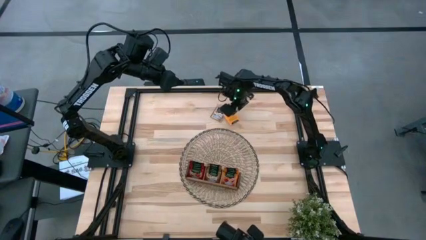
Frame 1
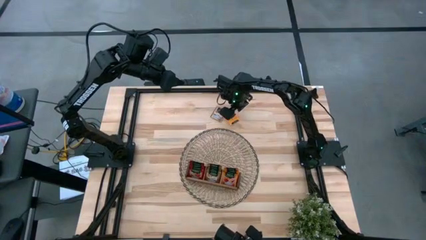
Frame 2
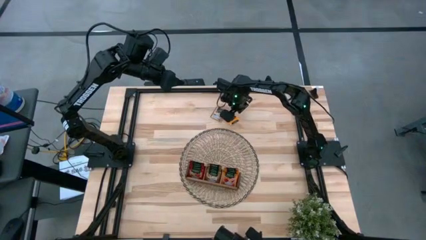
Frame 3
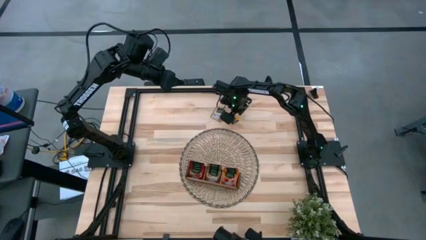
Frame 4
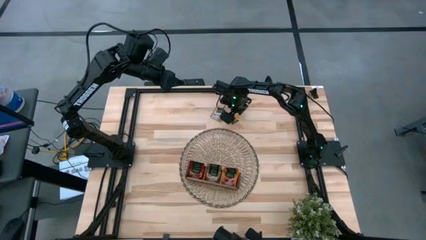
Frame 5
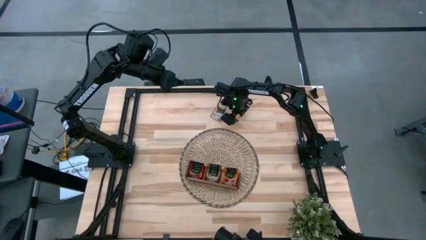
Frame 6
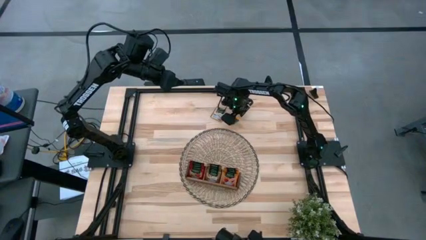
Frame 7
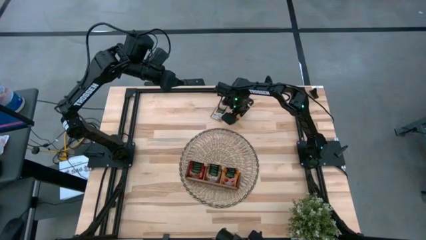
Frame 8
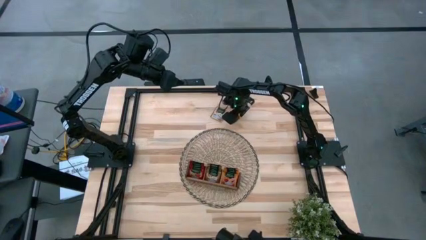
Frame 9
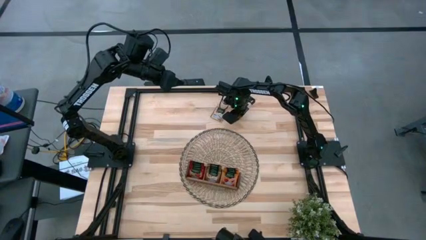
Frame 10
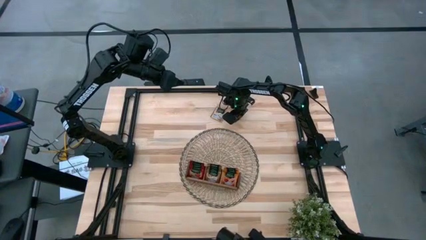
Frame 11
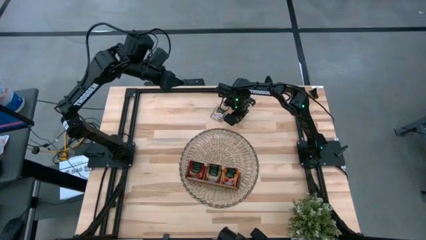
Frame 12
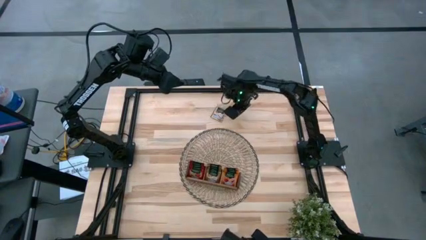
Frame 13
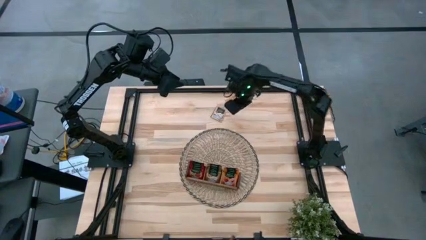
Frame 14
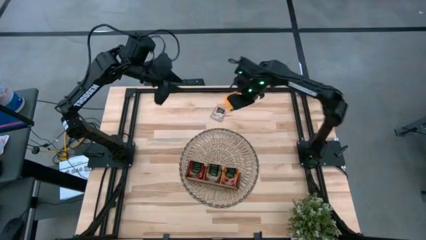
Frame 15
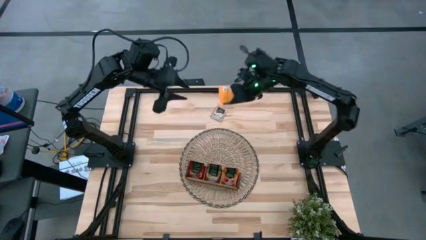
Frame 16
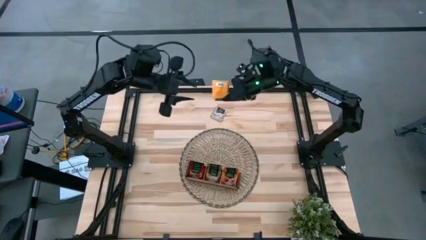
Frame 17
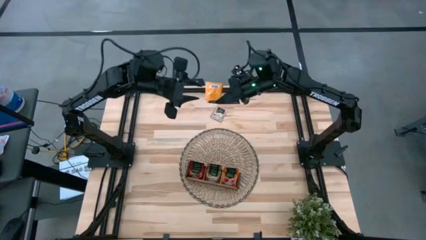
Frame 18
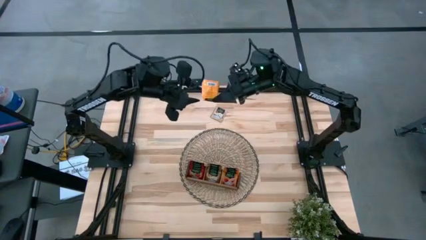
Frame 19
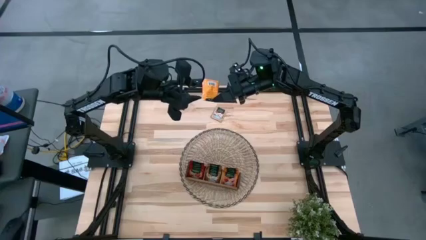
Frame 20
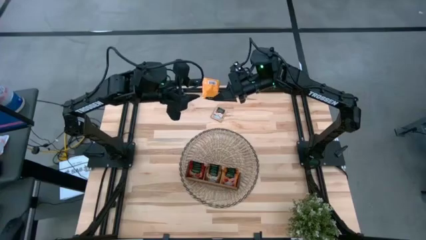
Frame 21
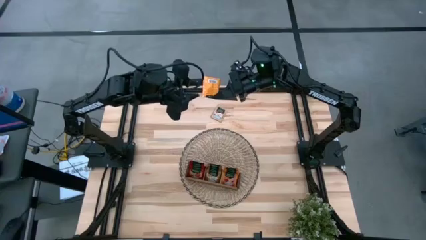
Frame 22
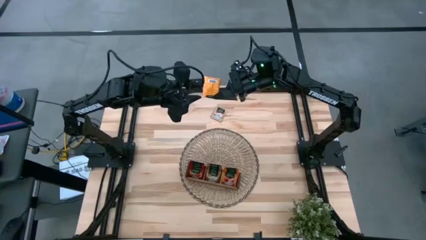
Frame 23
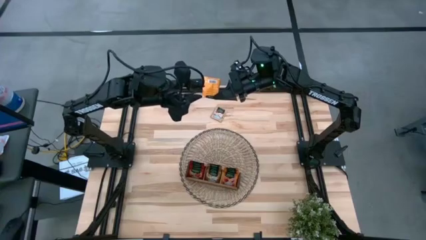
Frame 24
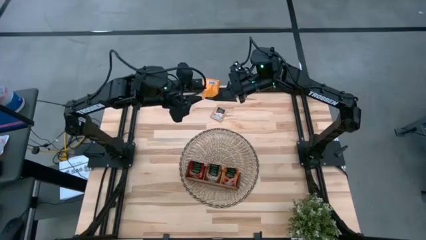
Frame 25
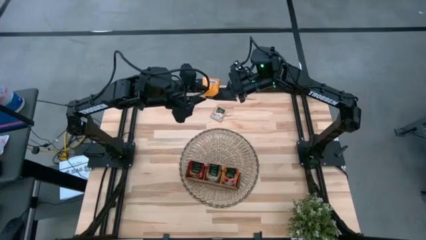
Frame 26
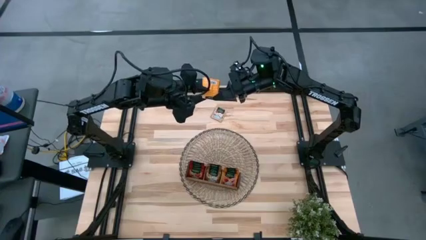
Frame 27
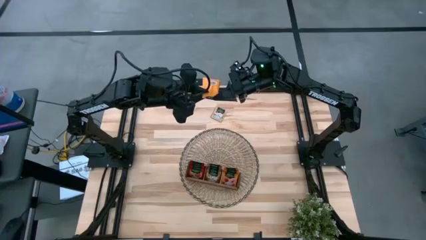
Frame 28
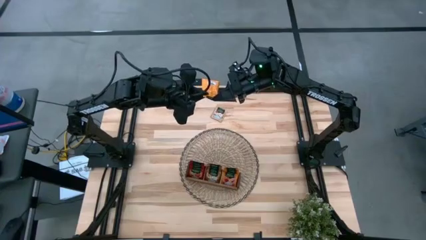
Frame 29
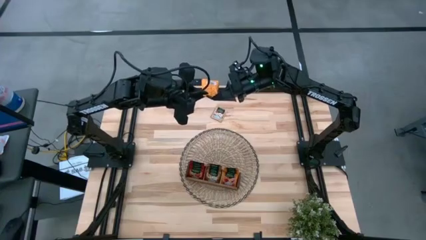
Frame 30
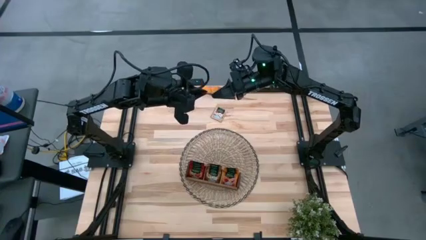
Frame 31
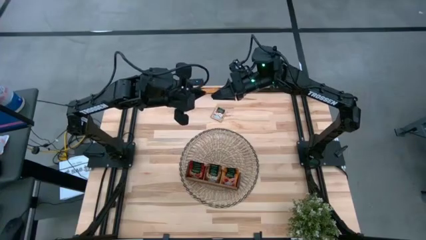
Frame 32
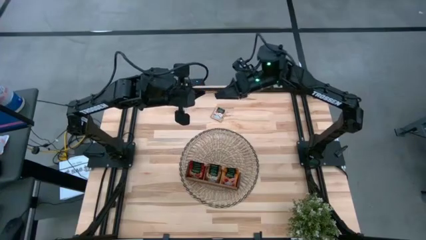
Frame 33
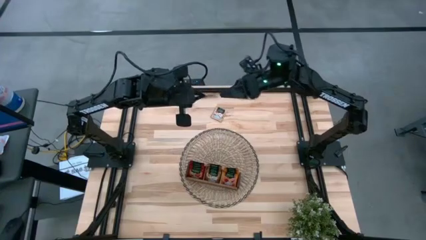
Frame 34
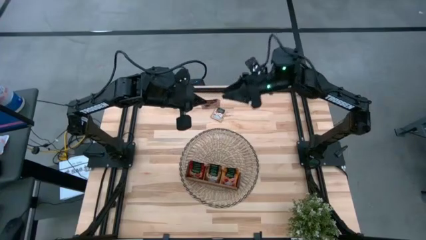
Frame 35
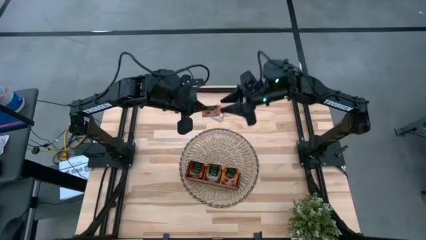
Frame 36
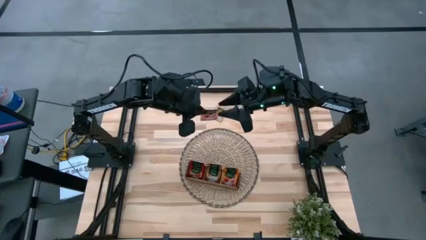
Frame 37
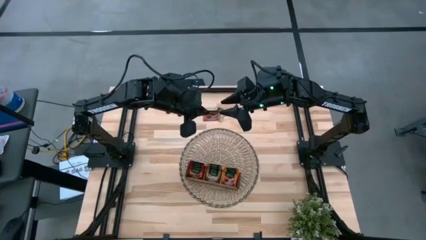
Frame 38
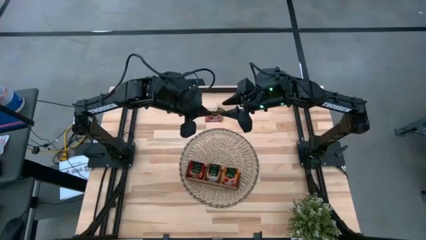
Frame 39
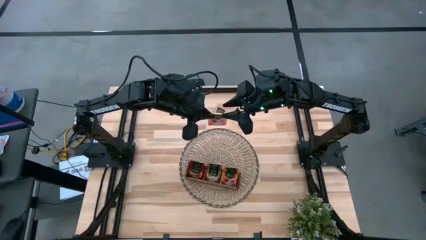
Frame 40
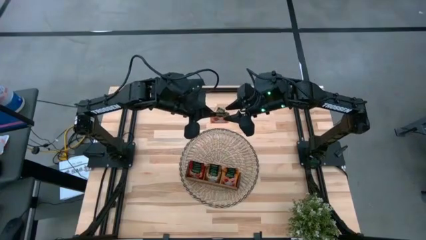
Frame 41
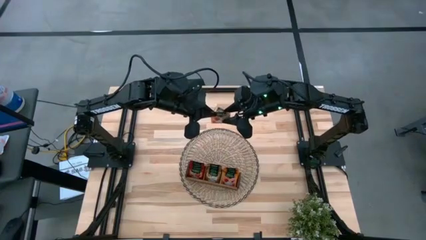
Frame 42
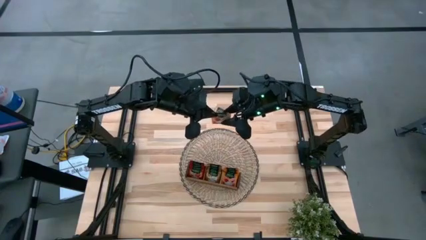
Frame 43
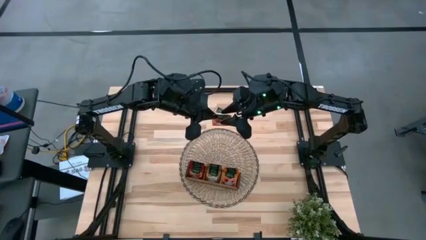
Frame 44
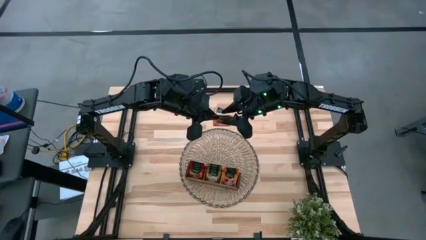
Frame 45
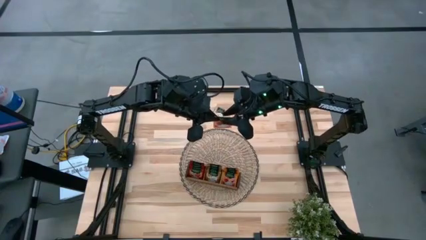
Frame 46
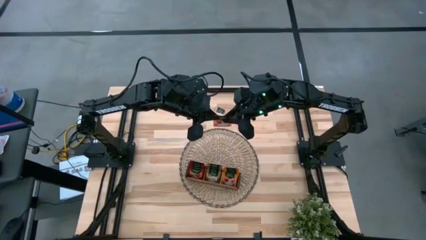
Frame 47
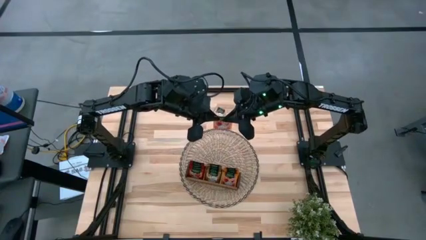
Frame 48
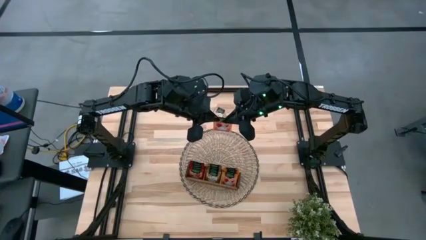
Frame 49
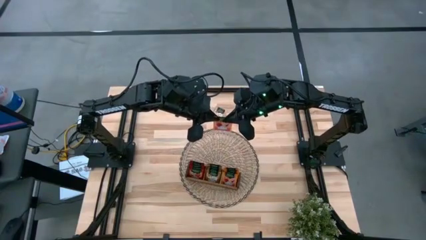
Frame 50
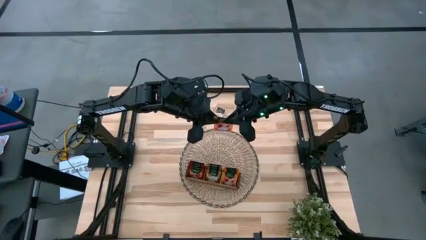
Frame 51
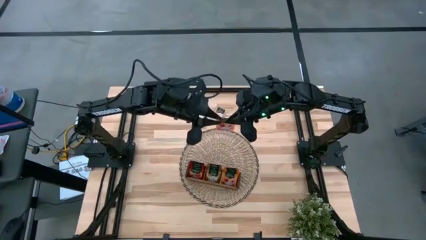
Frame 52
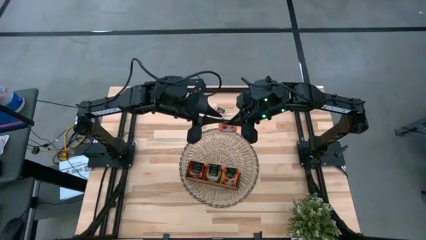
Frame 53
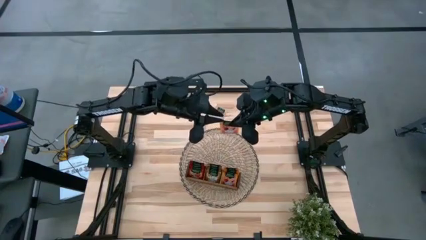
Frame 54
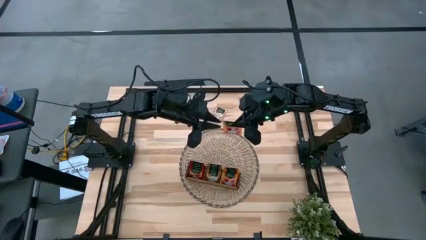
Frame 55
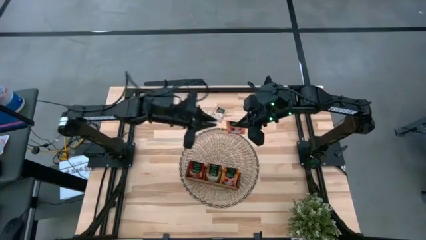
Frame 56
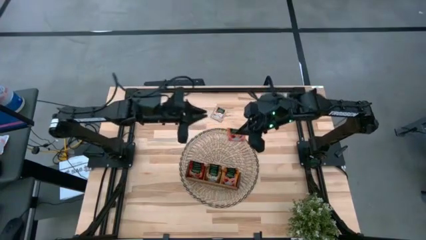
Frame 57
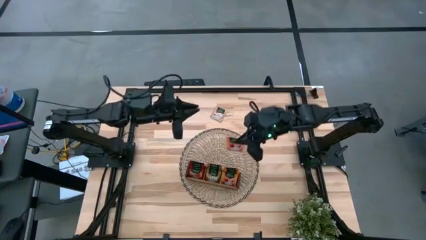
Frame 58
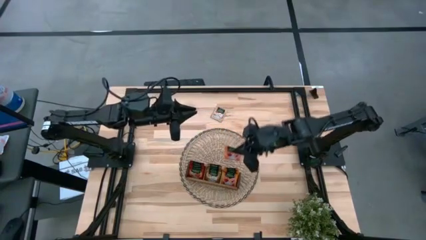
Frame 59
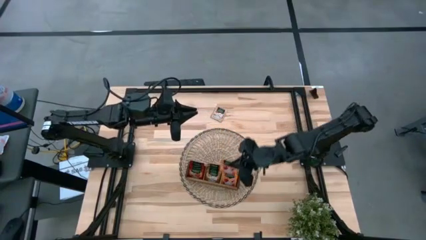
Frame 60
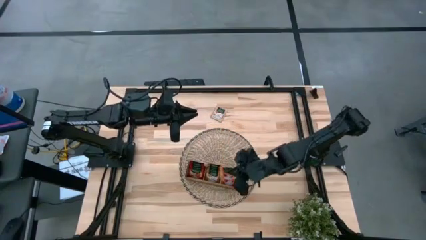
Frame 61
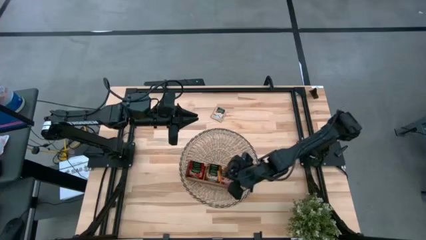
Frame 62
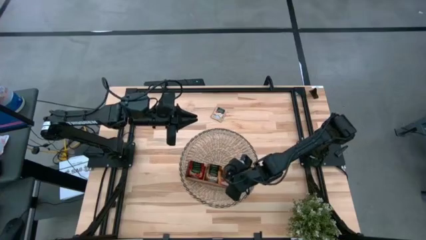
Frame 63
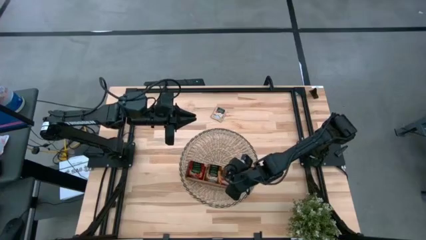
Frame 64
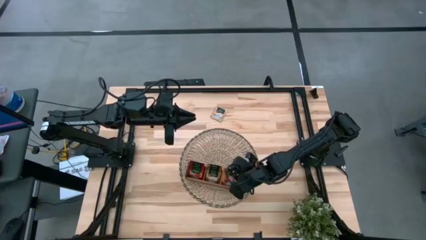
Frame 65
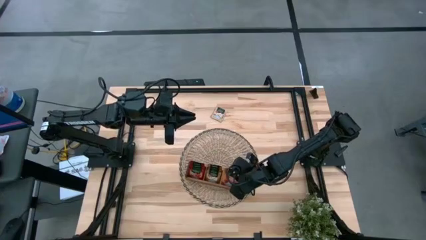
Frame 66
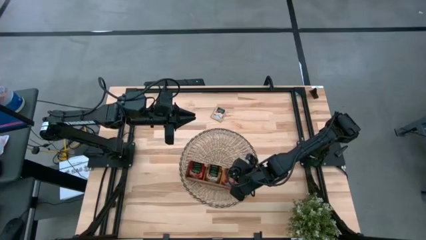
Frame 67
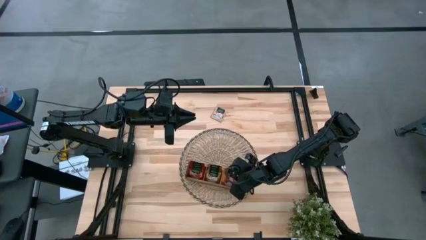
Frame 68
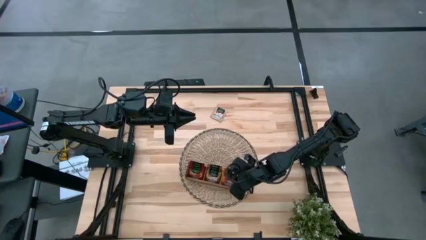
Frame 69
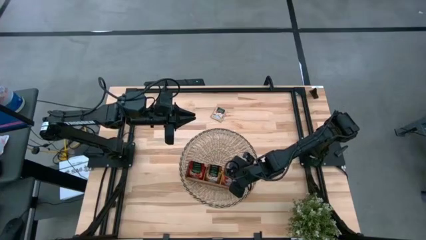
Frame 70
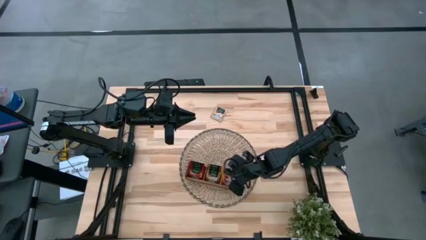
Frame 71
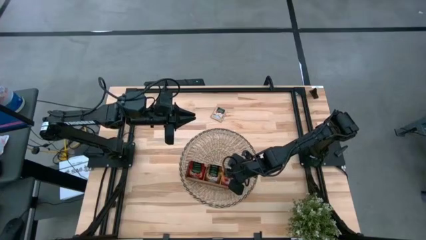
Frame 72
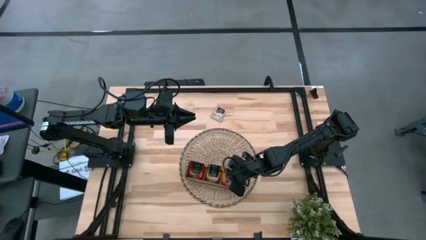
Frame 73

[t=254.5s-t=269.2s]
Task: Pick & Place Tea
Put the orange tea bag into the right section of the wooden organizer

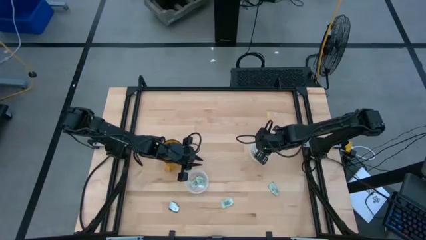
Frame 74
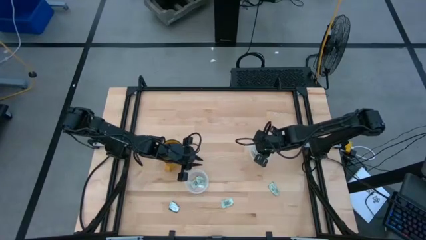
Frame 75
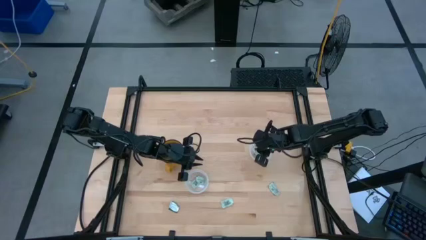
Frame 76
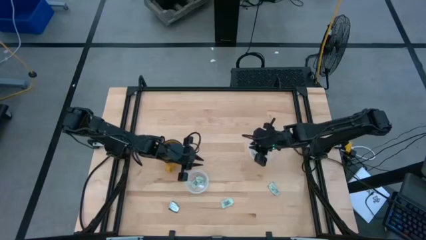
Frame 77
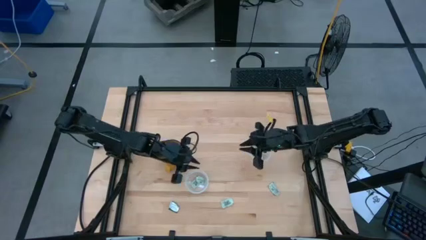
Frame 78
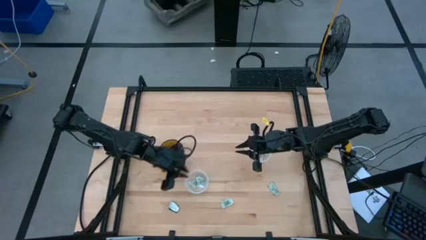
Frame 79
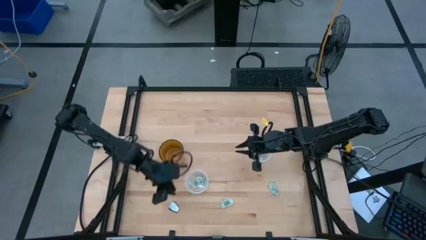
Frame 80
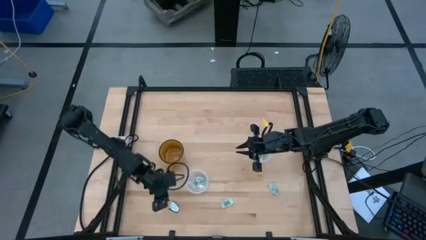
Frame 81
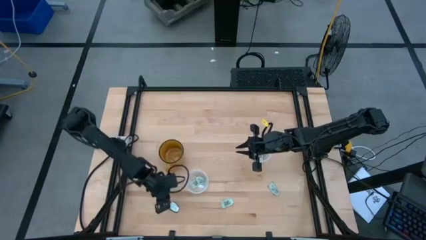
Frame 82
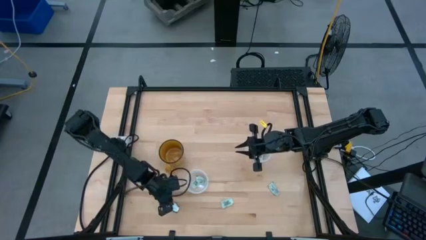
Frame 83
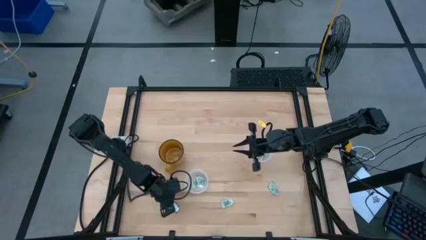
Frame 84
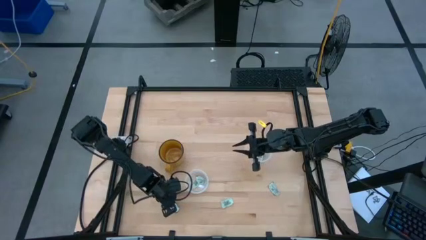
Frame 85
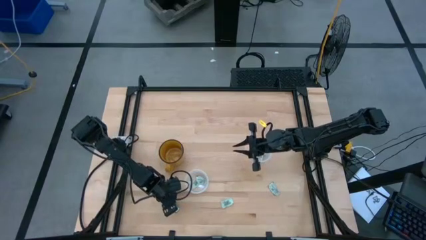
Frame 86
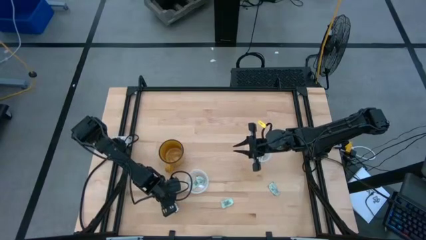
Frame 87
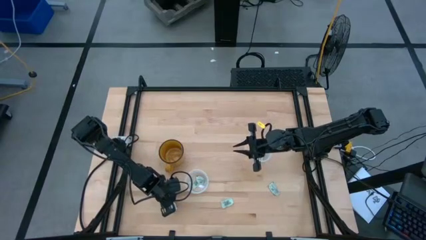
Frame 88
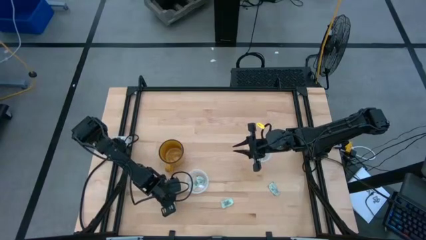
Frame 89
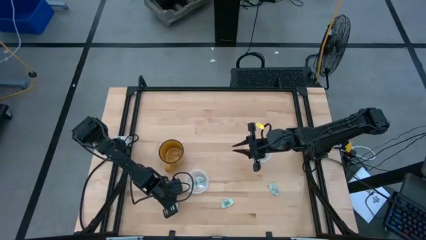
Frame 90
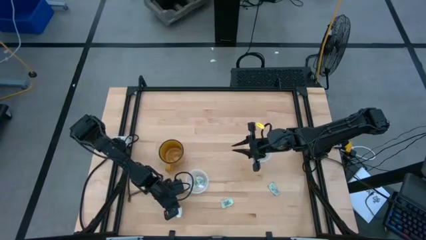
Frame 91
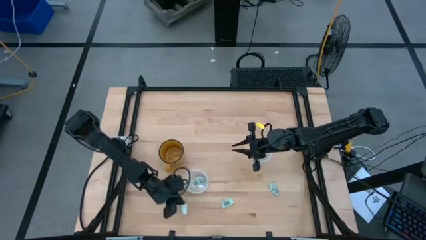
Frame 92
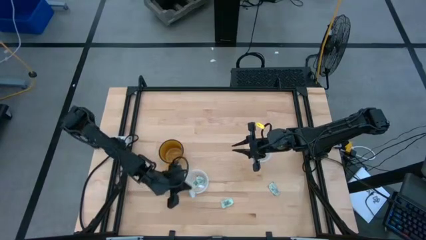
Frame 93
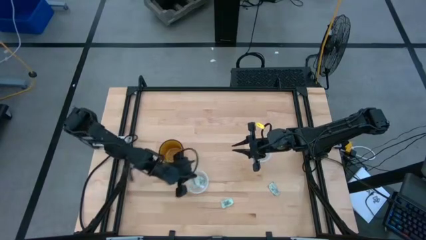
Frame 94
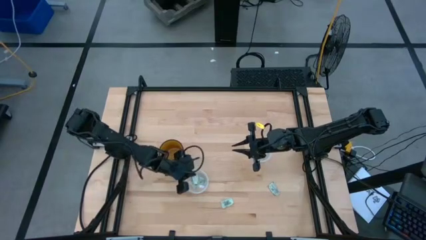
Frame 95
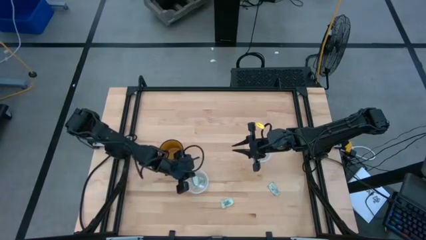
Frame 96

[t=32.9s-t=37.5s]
Task: Pick and place Stevia / Truvia into bins
Put the green truvia packet into the left transparent container
